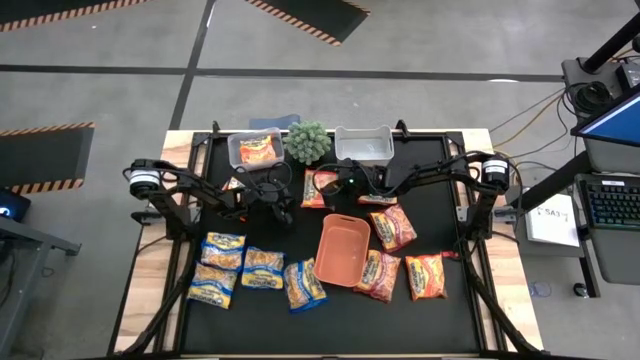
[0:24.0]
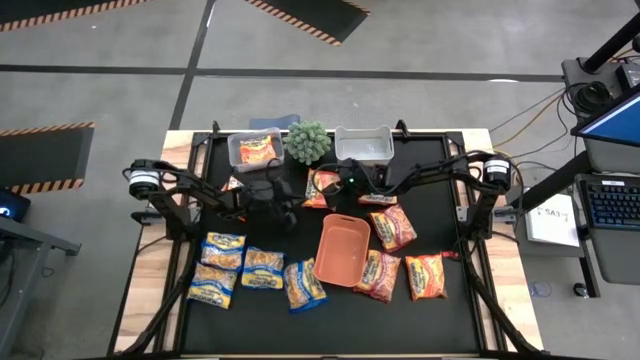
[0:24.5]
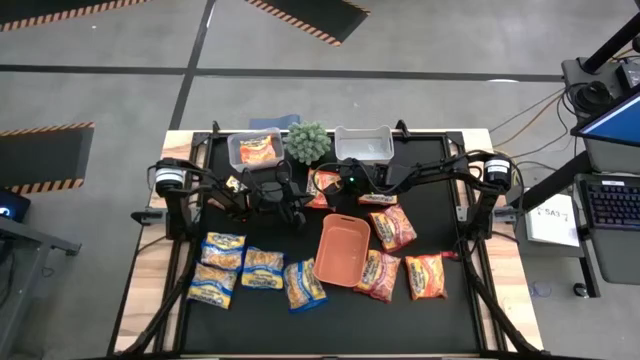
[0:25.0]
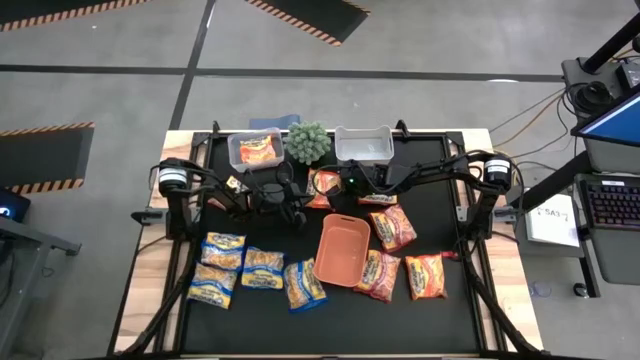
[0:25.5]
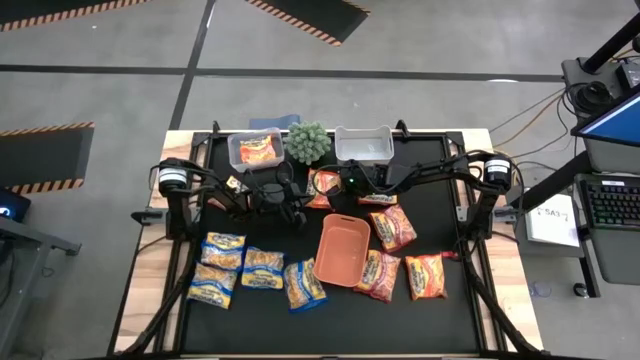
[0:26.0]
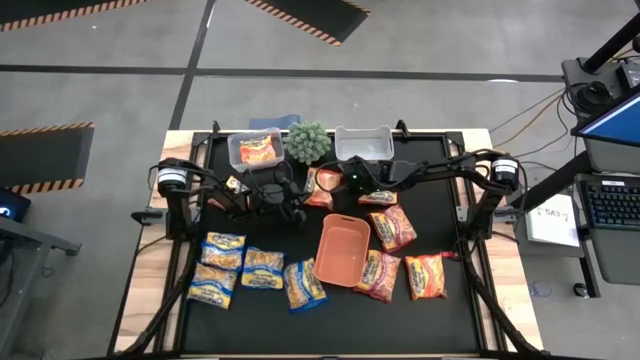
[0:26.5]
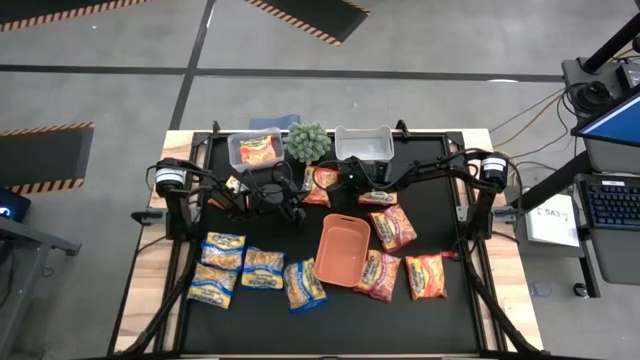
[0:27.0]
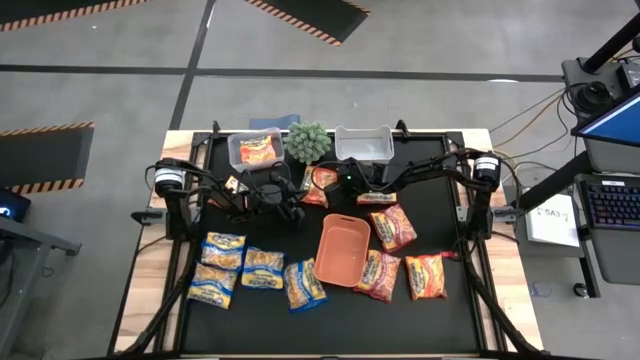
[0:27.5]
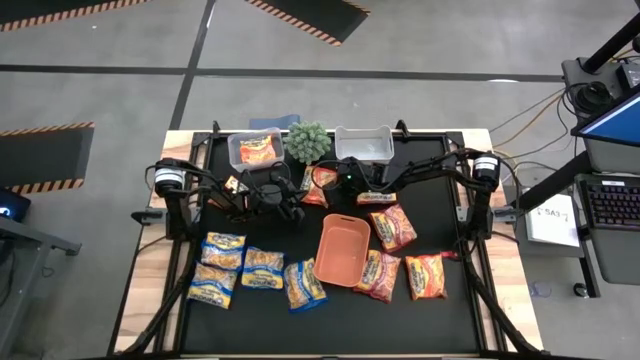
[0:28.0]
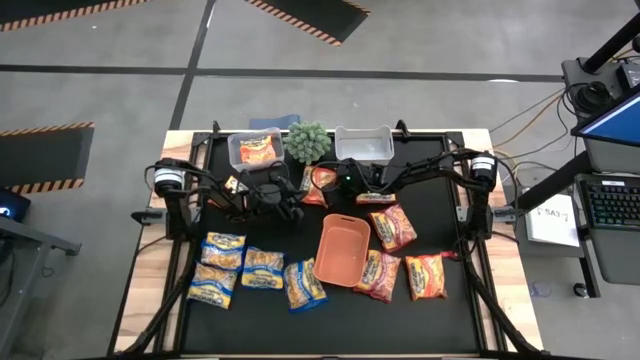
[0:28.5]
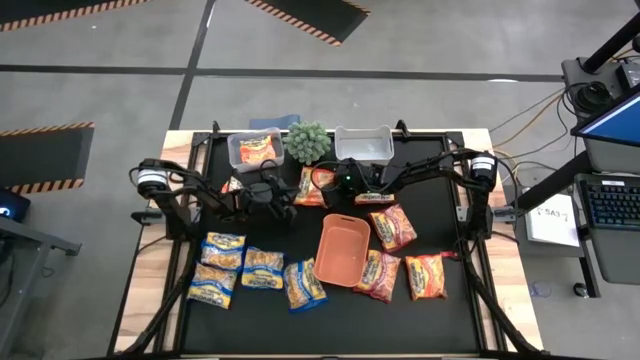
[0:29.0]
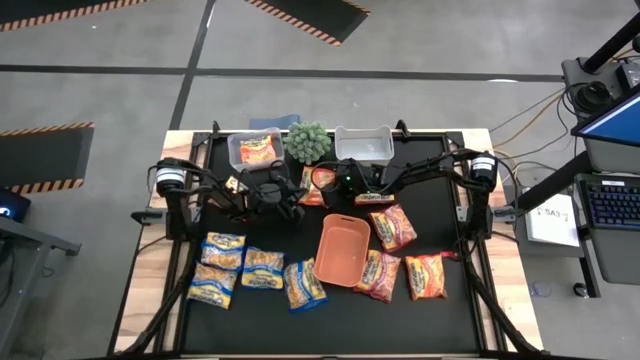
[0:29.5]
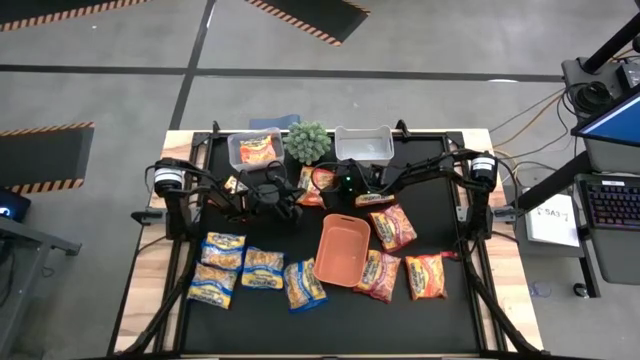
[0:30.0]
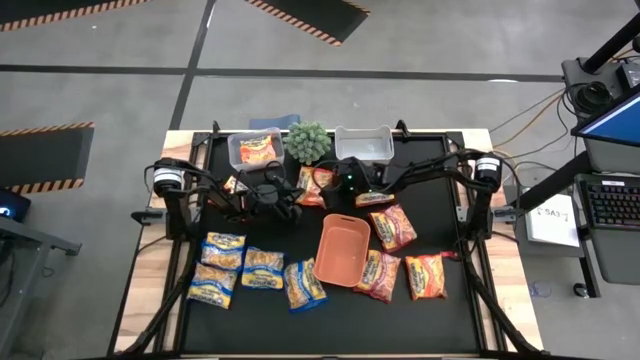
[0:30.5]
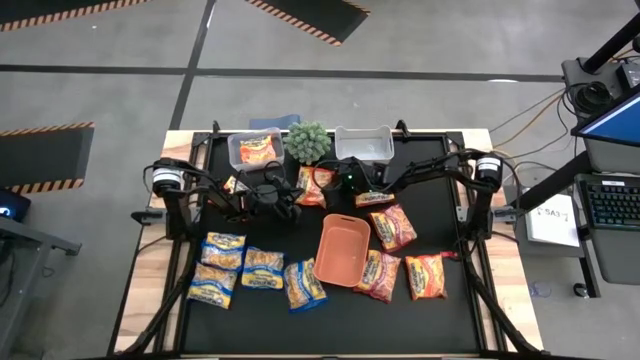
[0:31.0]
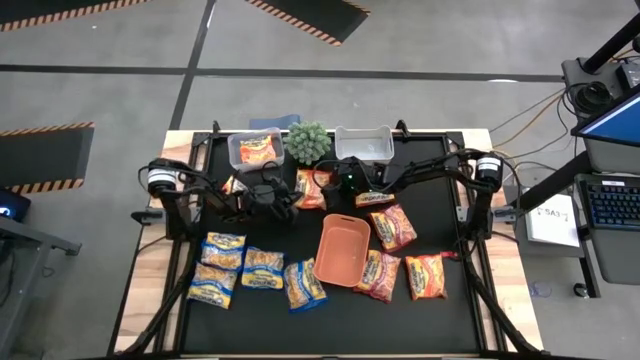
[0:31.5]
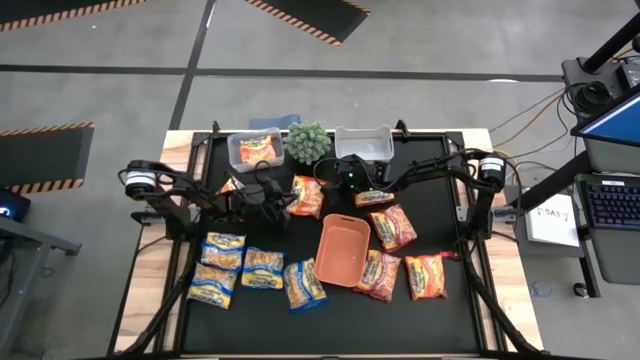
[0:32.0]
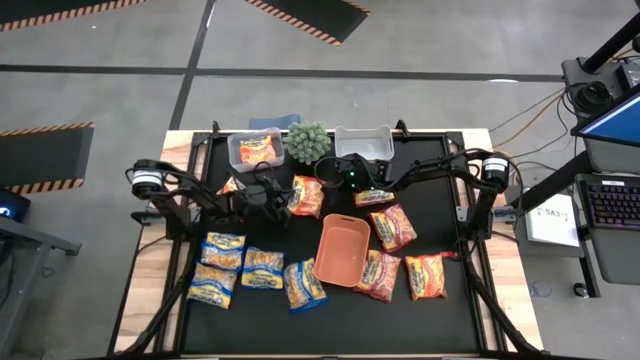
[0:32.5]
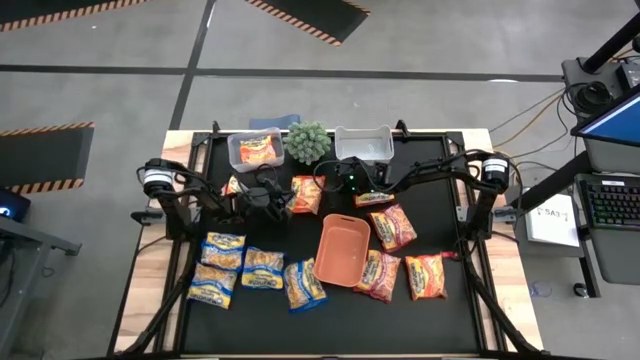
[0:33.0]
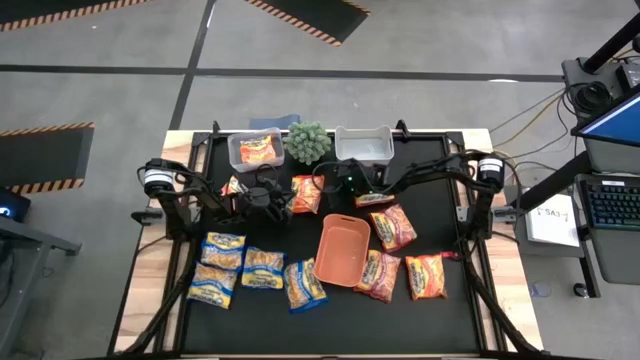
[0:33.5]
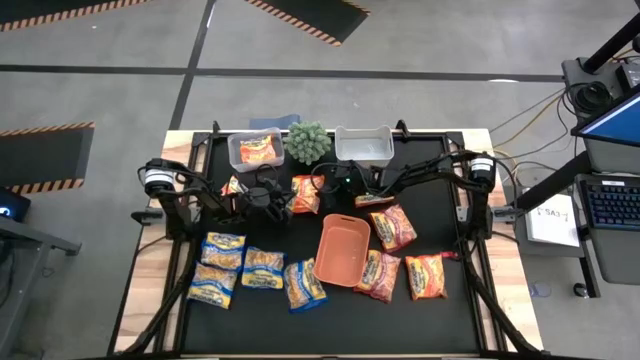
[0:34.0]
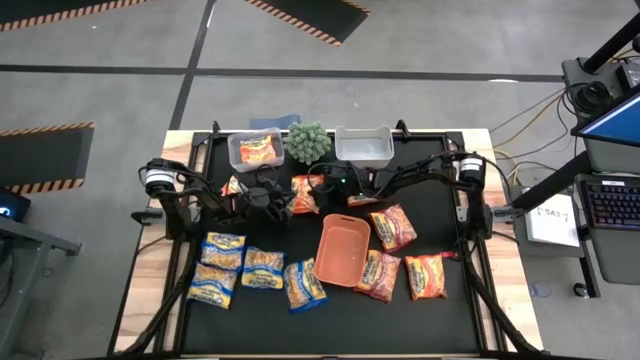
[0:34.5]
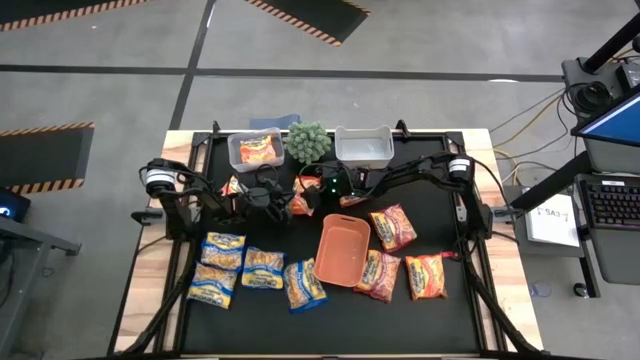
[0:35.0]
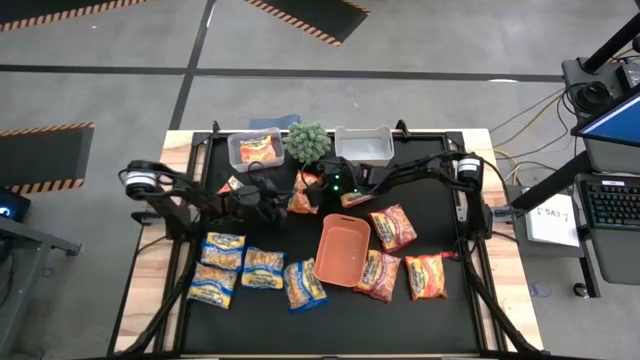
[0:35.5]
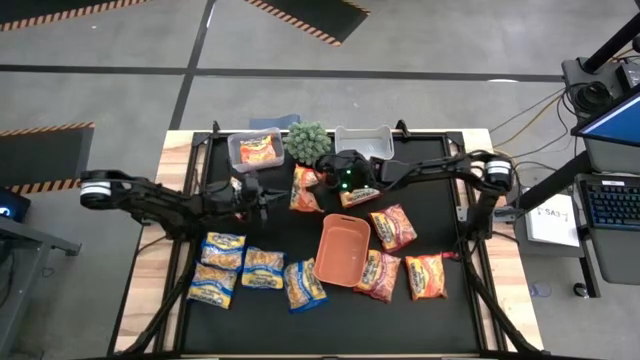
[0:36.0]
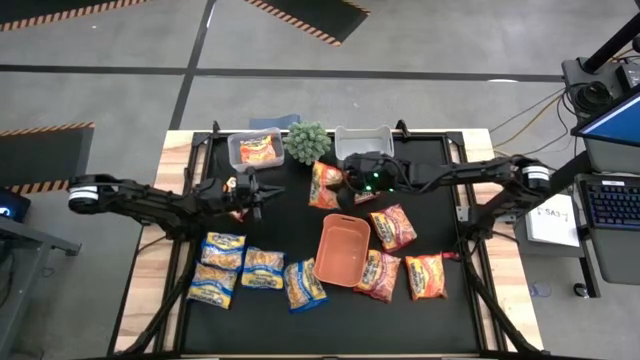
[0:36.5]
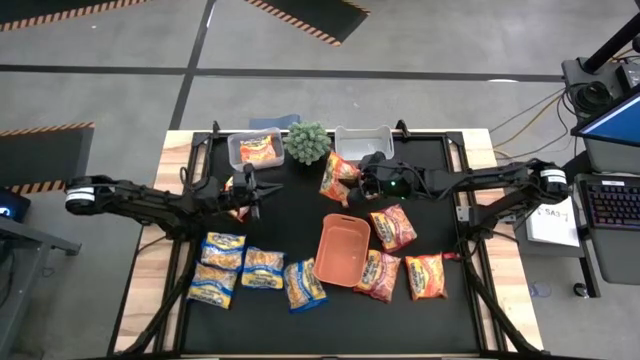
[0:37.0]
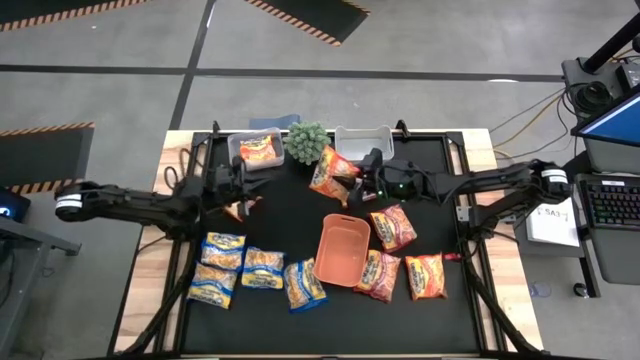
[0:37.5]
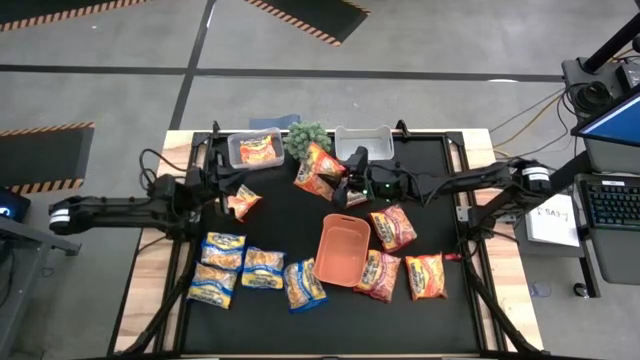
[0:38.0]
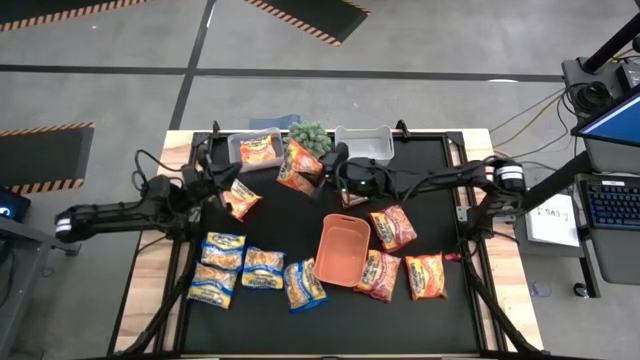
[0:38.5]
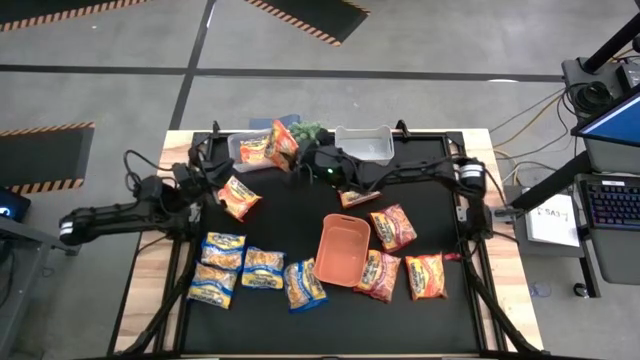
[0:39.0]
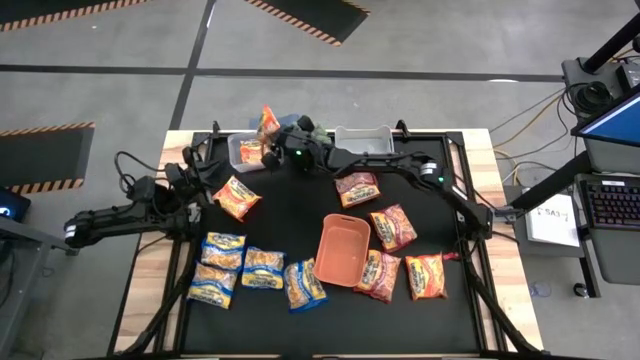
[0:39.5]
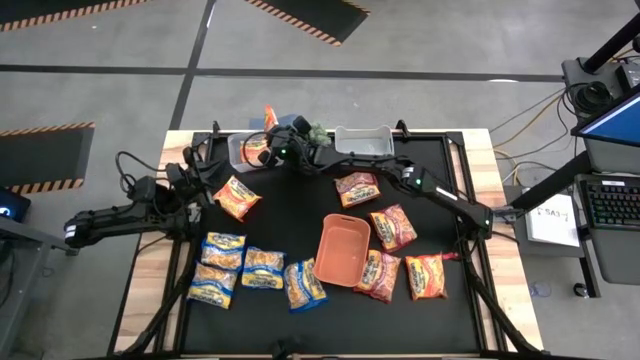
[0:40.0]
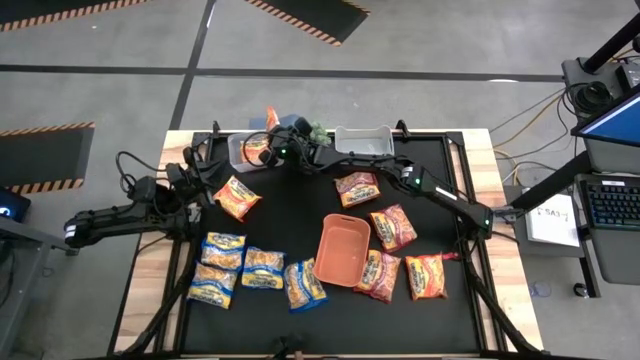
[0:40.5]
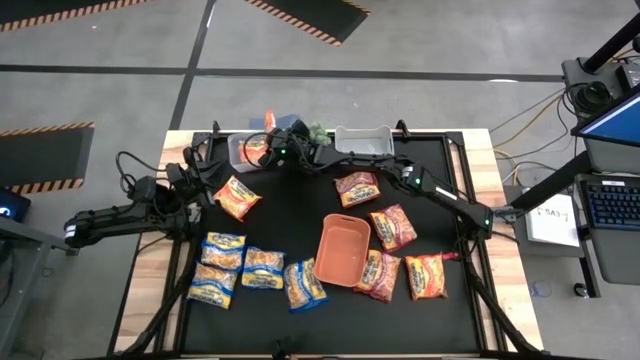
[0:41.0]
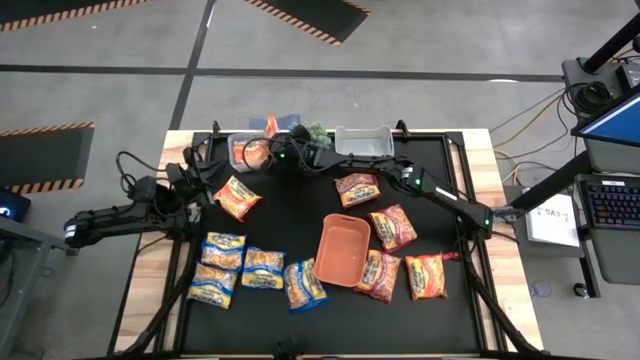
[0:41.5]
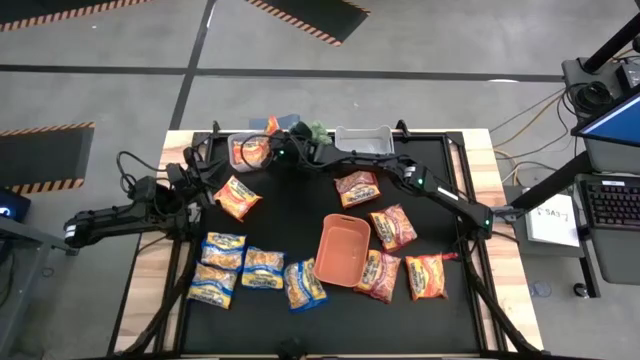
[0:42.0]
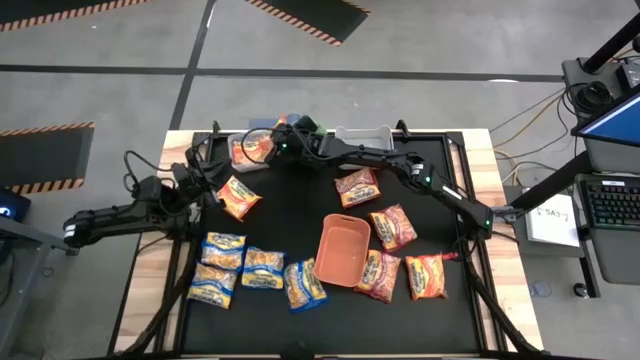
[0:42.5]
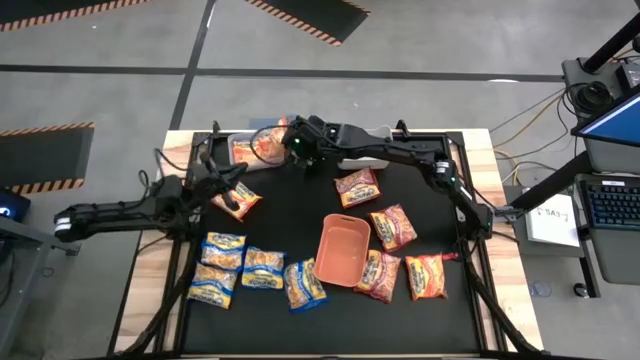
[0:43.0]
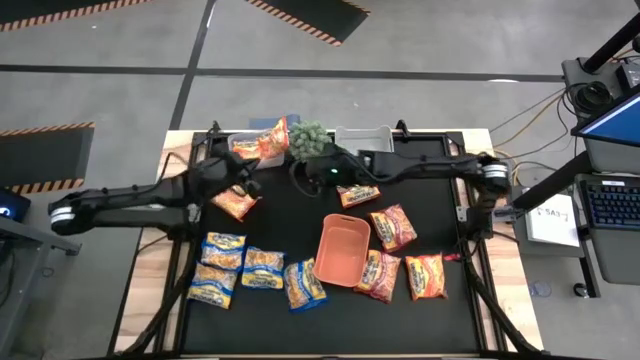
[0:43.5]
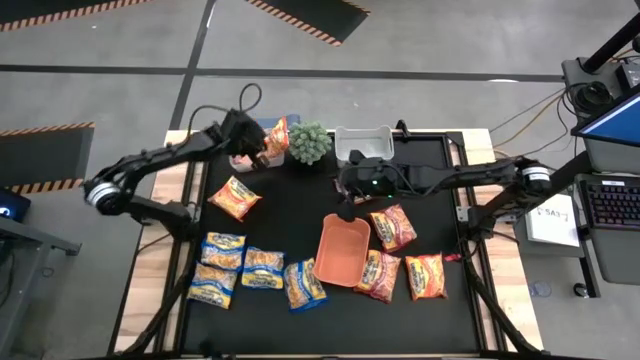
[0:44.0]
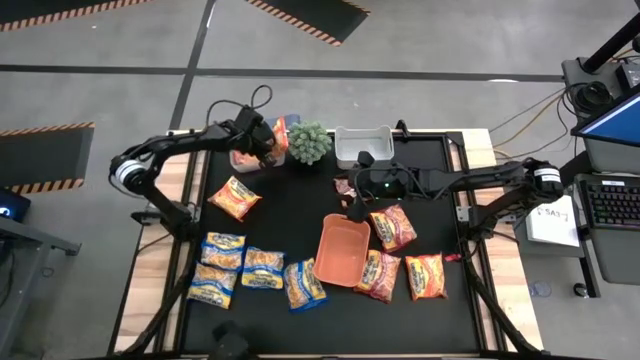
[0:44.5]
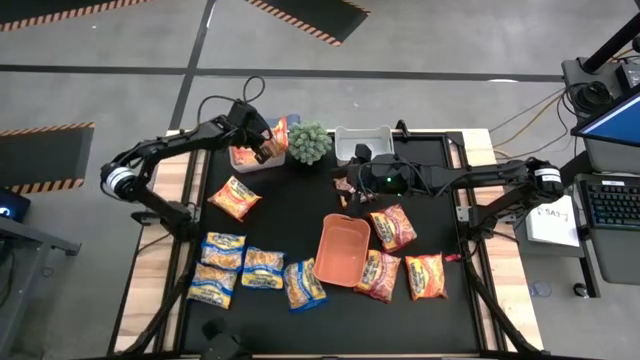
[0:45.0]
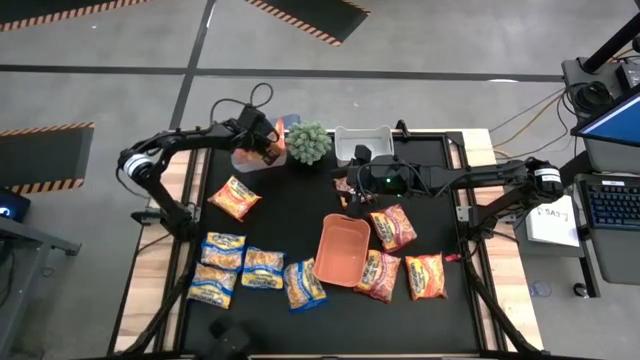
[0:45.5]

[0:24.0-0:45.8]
Task: Sort Maruchan noodles
Put the orange noodle pack into the transparent bin
